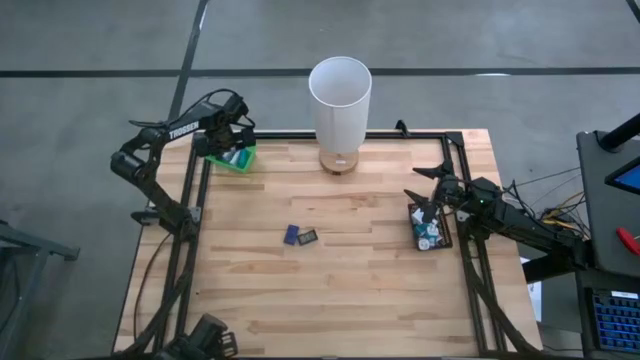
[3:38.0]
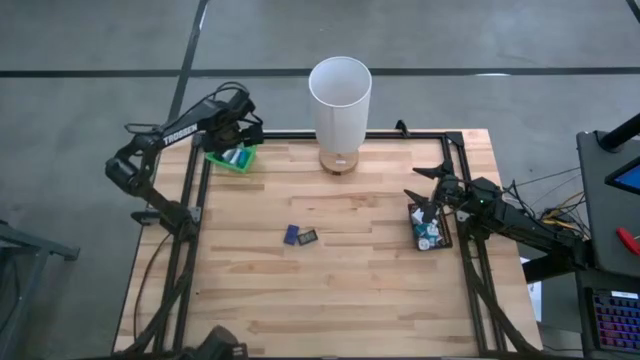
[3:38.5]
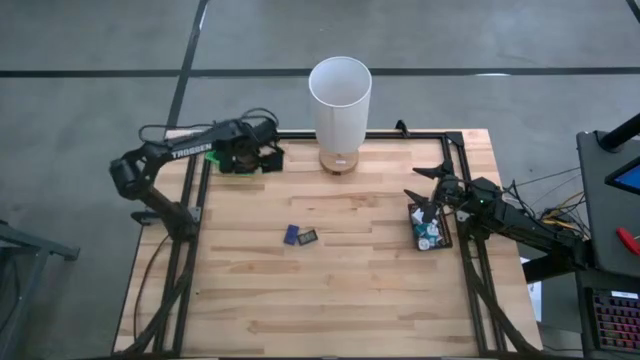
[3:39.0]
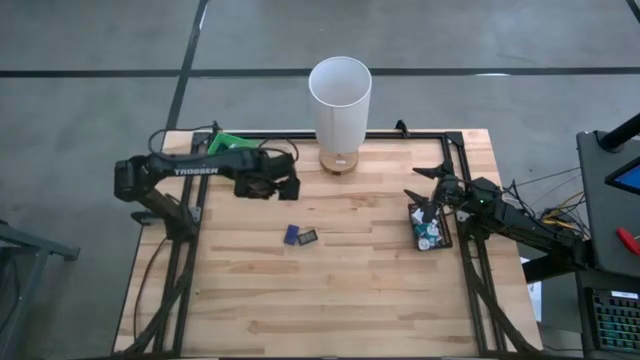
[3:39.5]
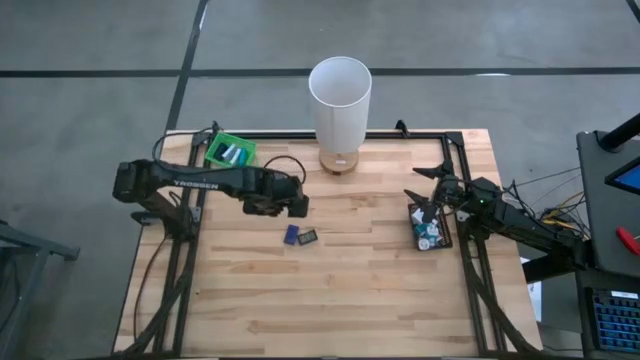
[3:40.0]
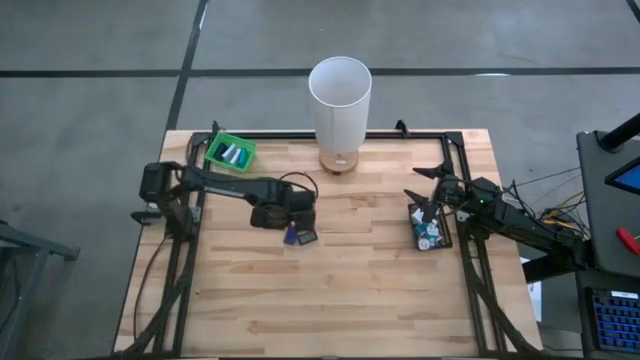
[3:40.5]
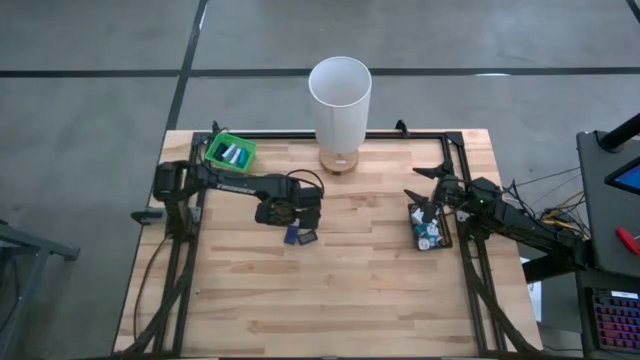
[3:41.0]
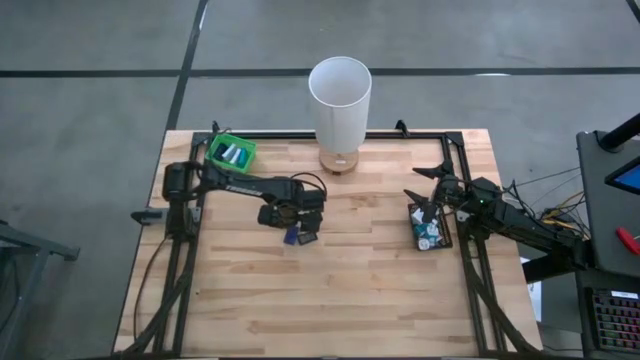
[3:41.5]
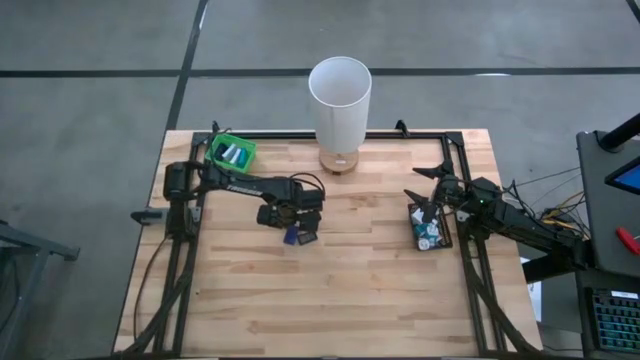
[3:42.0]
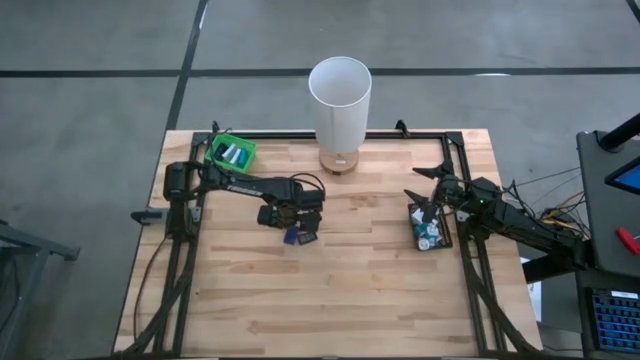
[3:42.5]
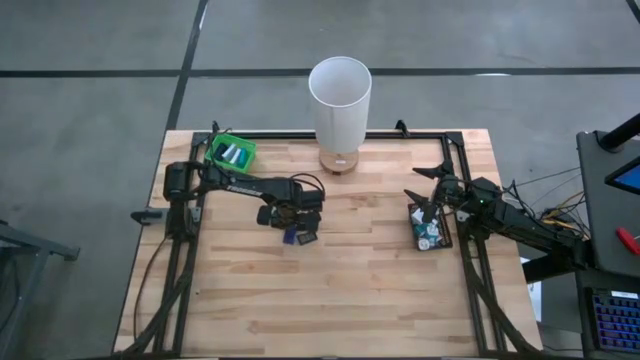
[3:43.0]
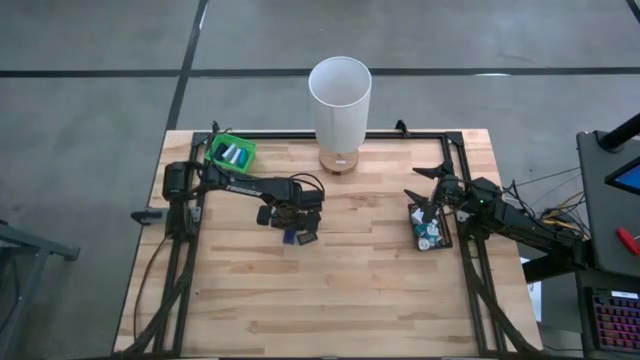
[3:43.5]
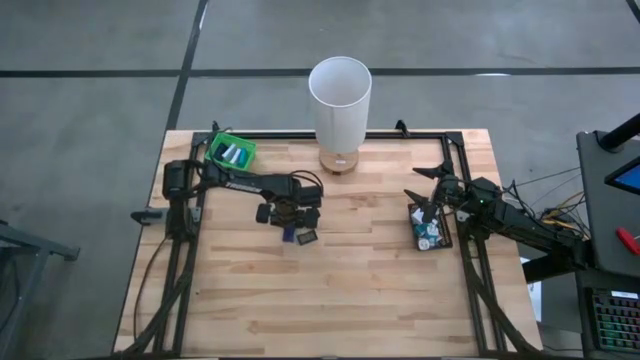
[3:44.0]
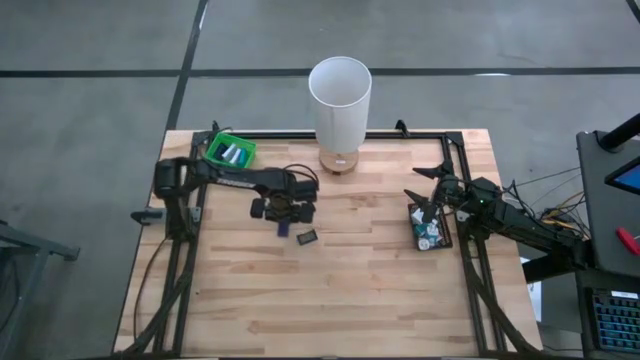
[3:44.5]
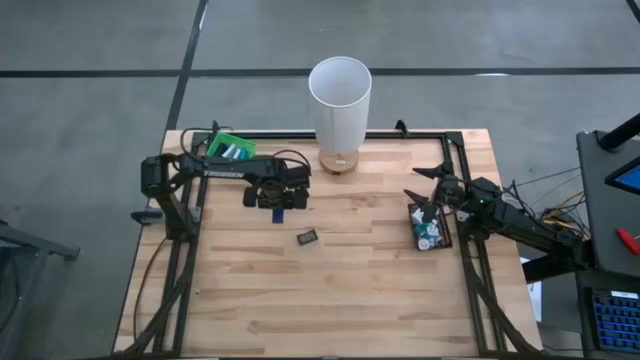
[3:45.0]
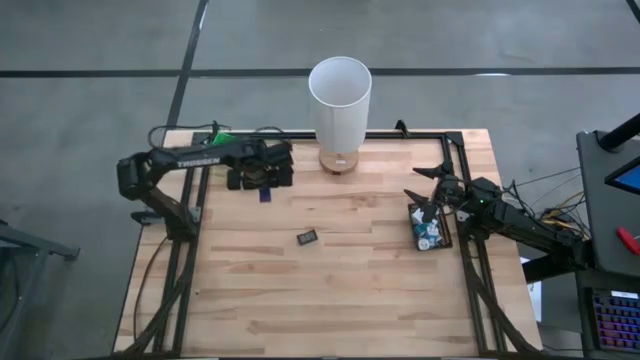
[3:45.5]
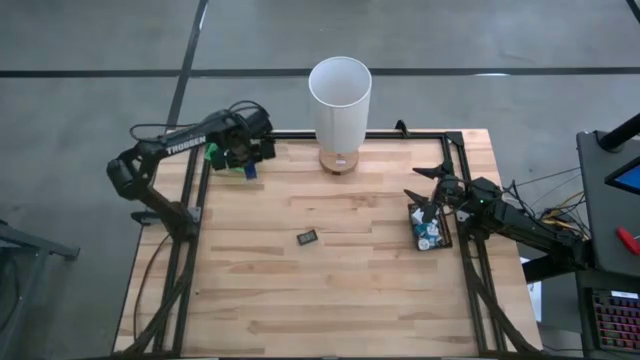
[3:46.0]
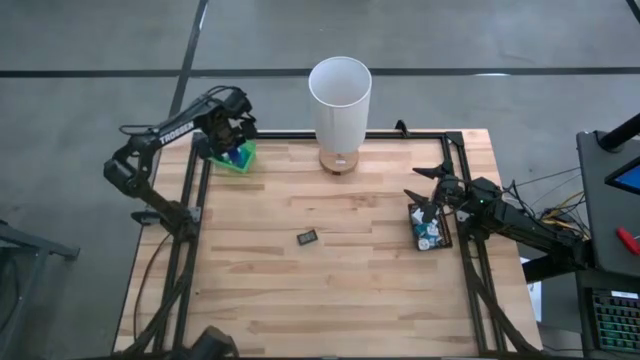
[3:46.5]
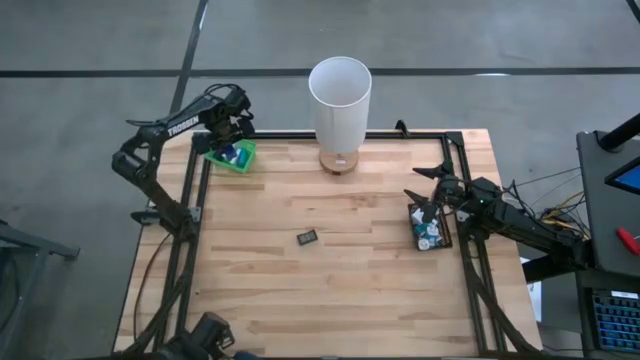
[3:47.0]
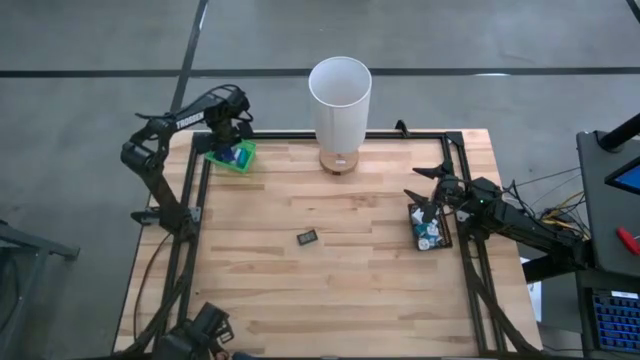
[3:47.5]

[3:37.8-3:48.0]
Task: Pick & Place Office items
Put the blue digital clock into the green bin

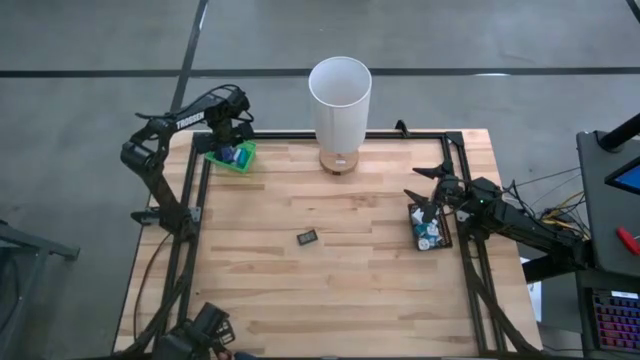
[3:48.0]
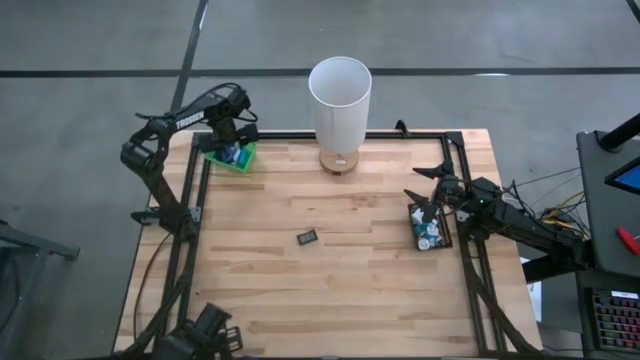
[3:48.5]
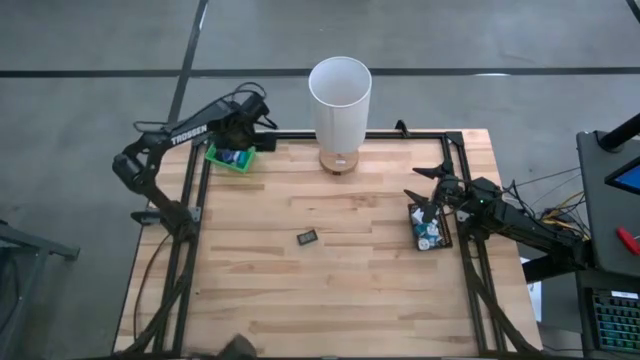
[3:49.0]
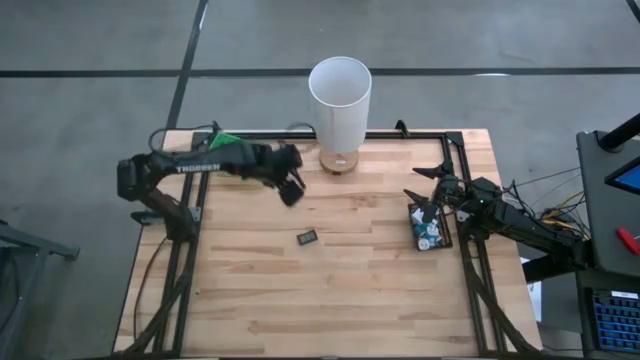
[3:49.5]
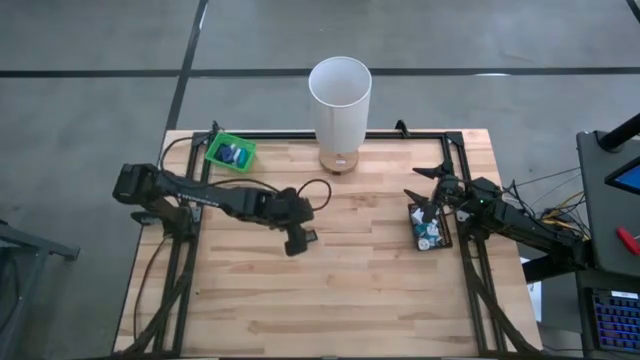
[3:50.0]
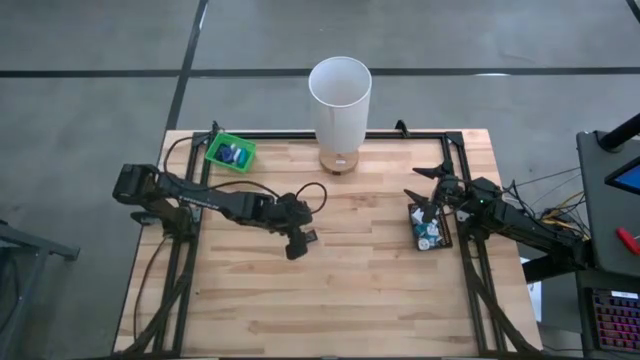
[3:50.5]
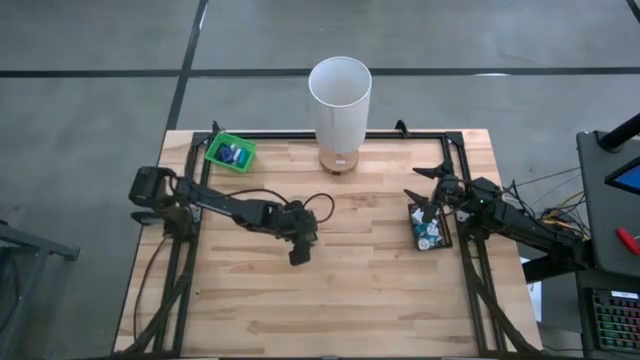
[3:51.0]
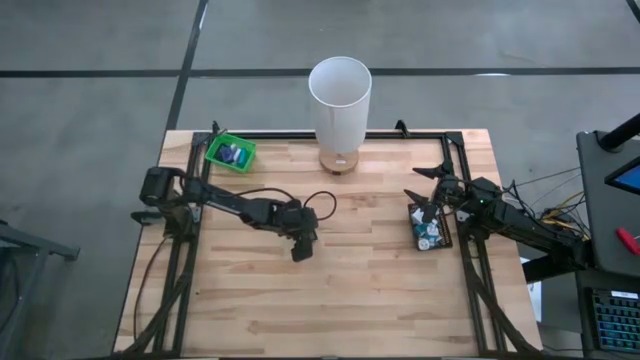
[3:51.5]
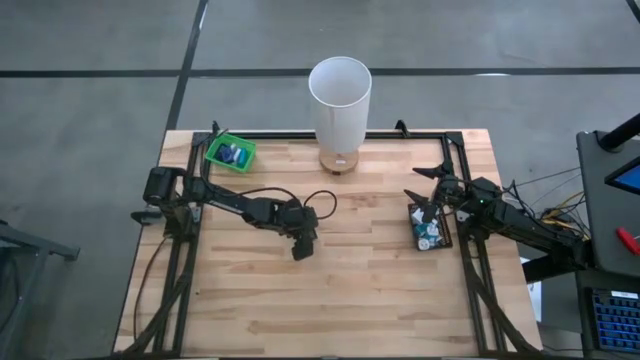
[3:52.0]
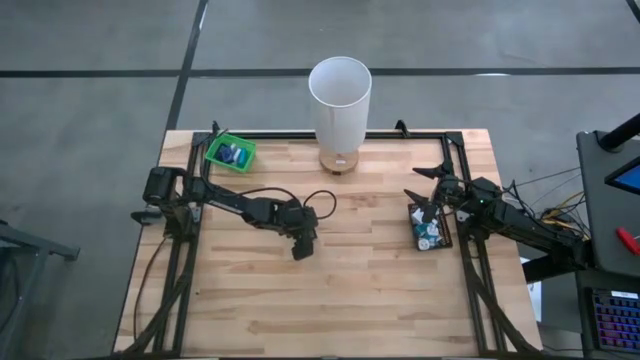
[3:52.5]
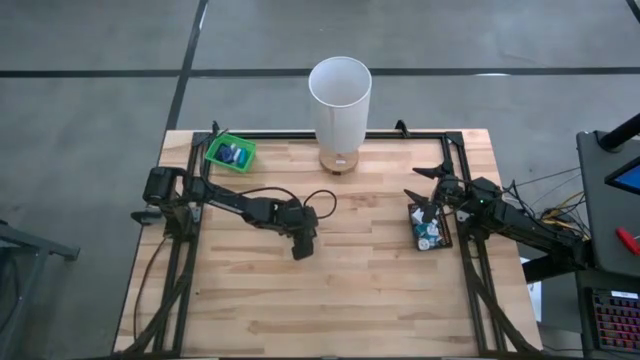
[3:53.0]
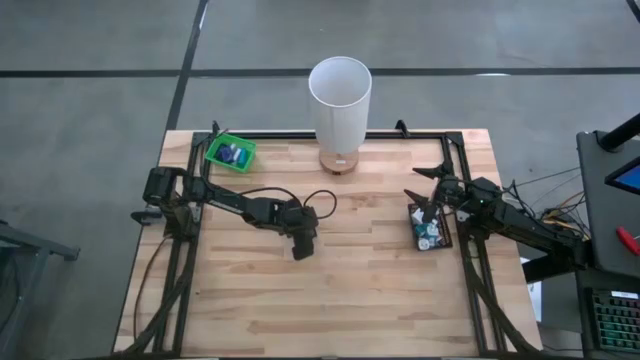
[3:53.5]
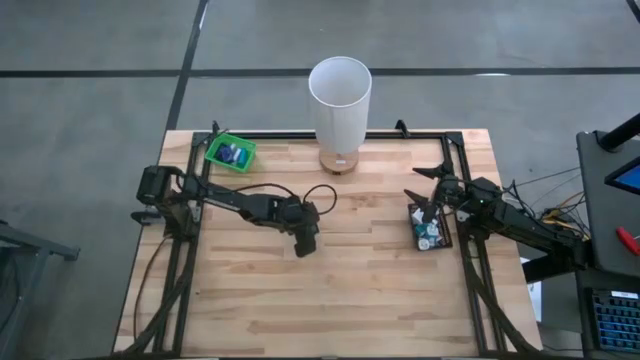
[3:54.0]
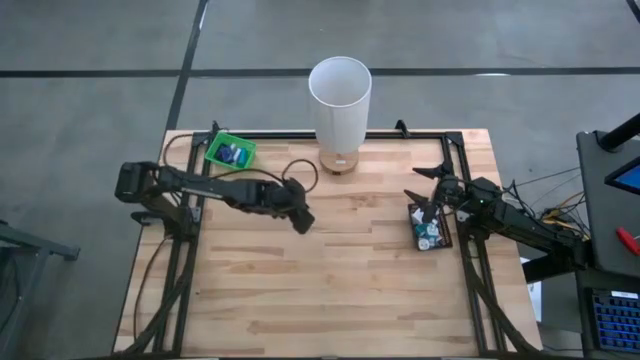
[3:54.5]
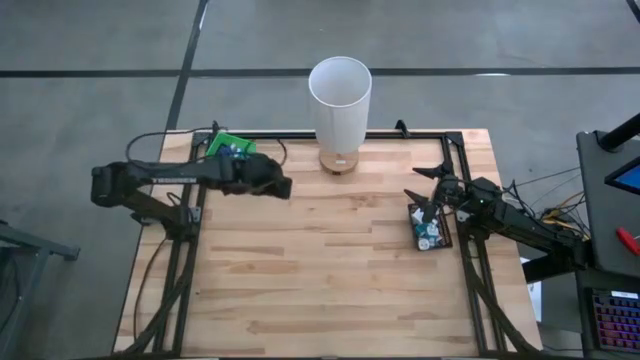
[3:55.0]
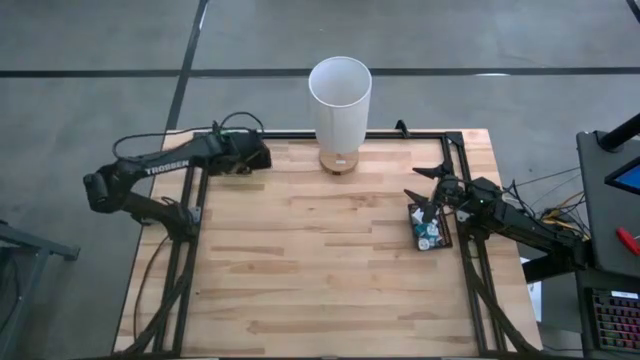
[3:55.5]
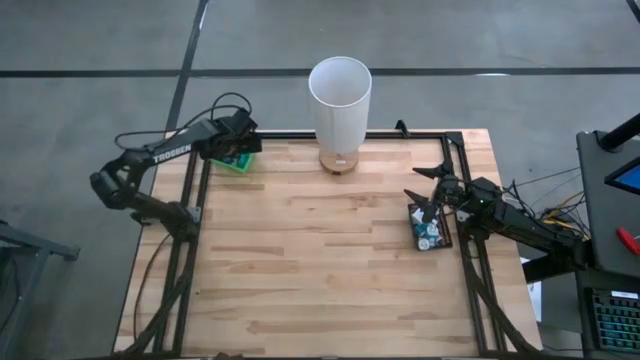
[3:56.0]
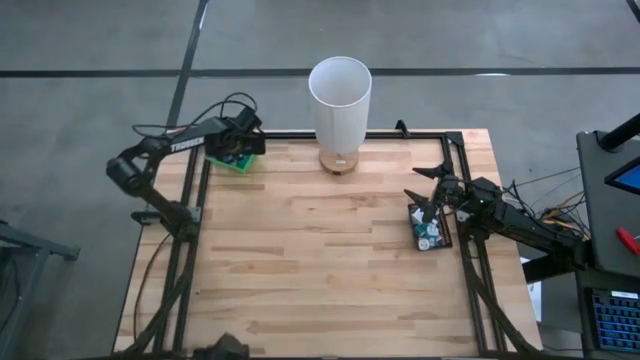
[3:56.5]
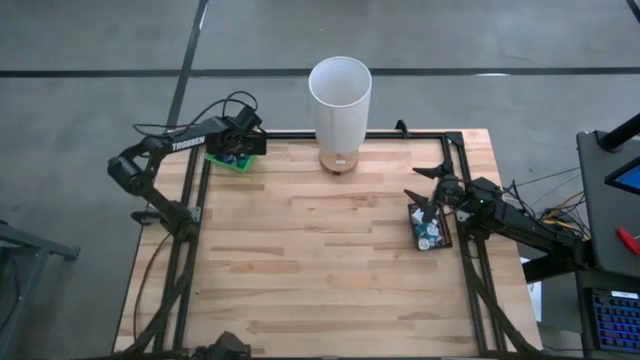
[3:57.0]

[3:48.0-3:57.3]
Put the black digital clock into the green bin

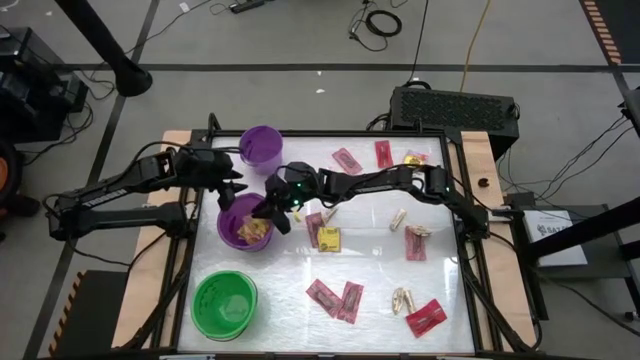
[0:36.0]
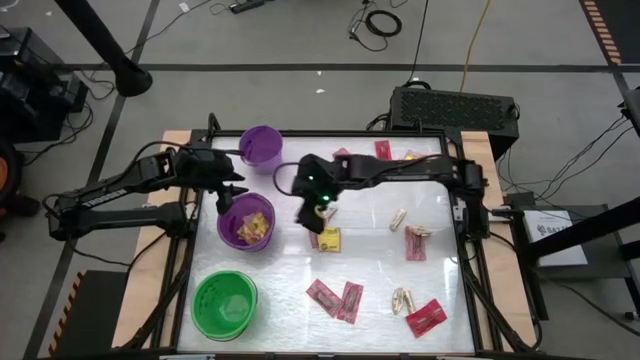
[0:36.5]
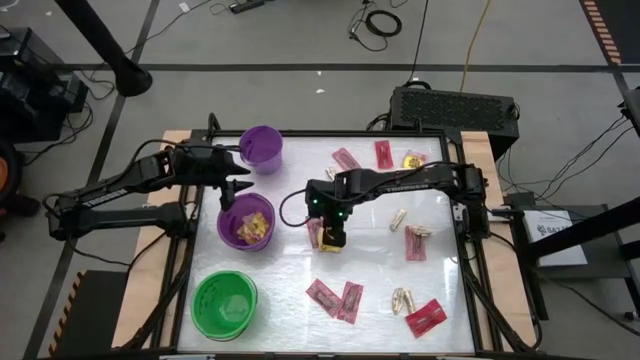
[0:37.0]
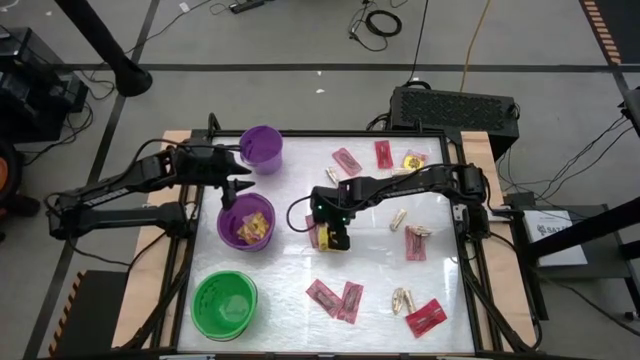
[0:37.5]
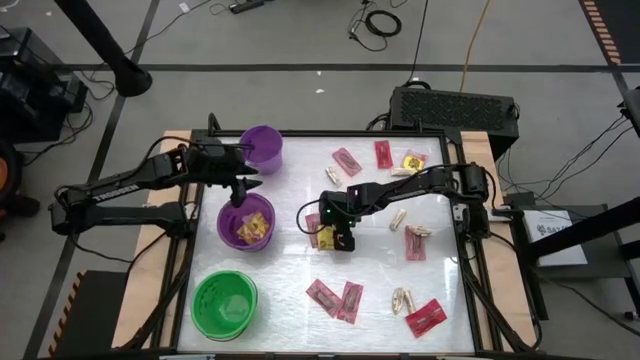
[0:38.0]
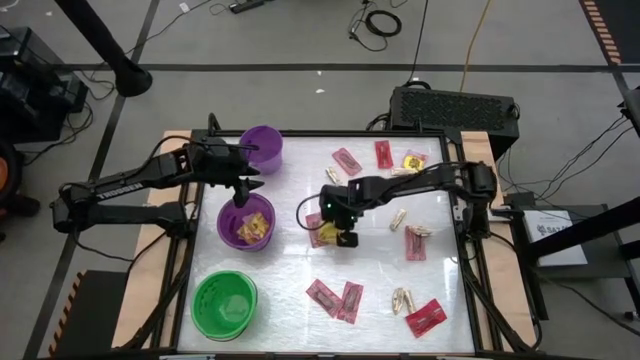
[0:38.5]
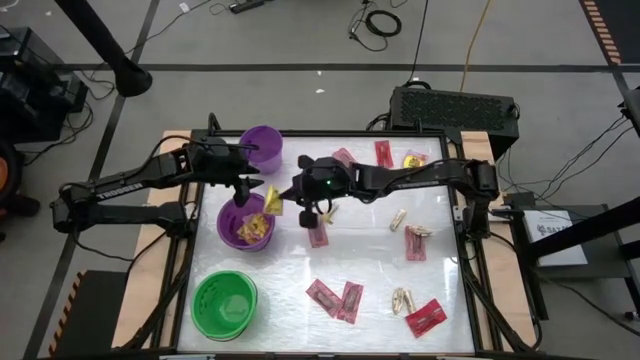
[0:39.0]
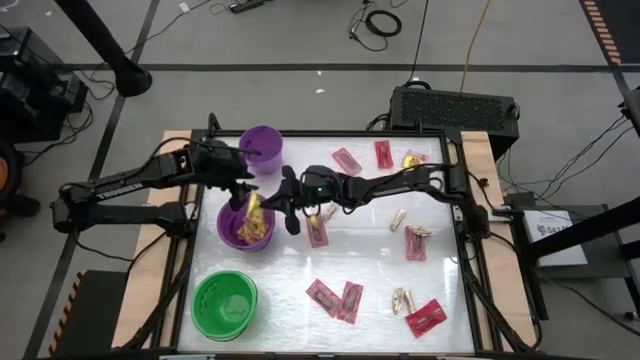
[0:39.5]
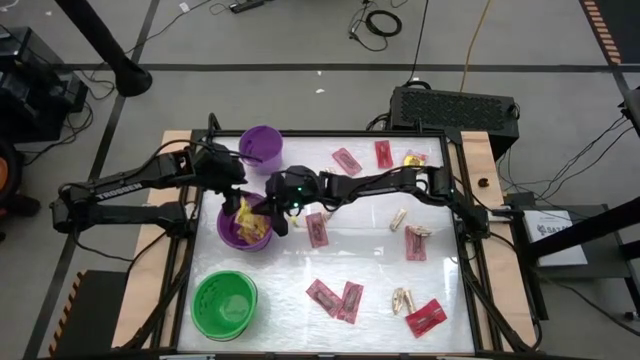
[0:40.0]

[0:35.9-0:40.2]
Task: Sort candy by brand, put in halloween buckets
Put the yellow candy into the bottom purple bucket
